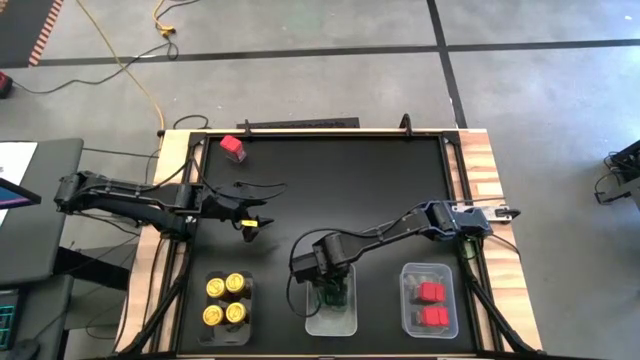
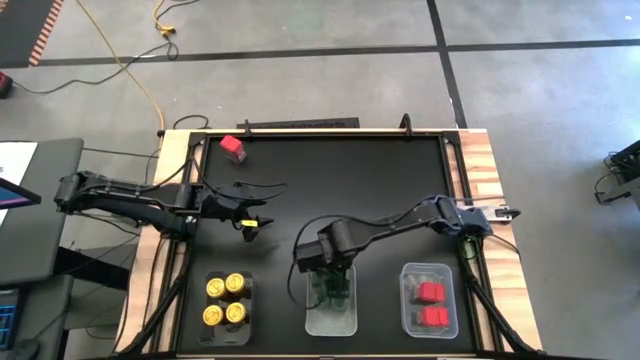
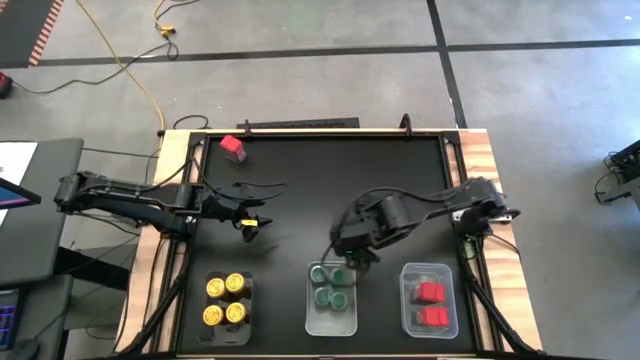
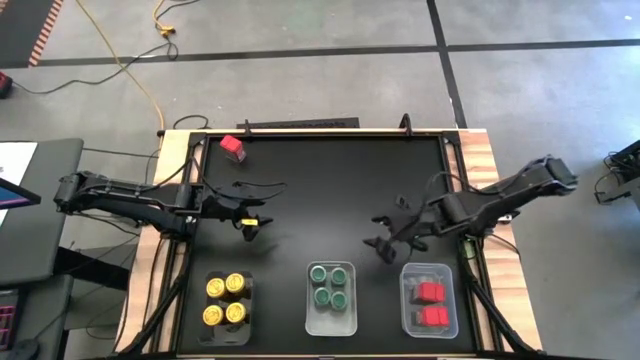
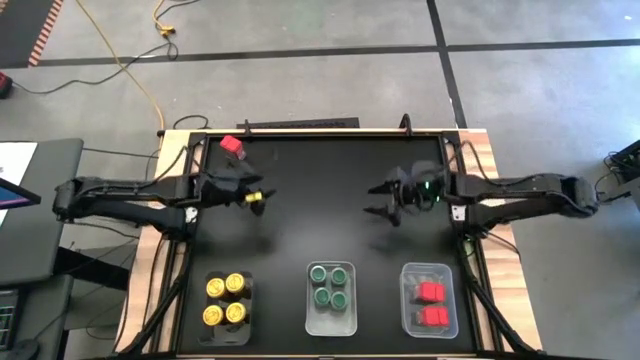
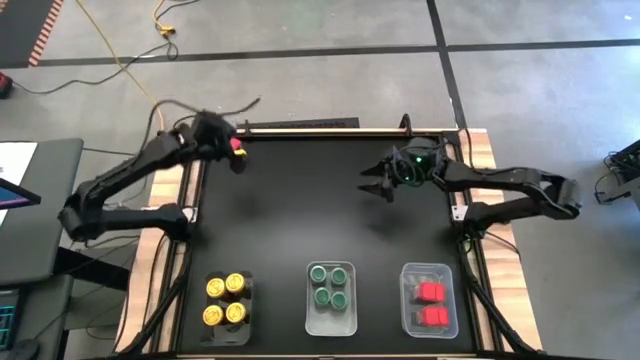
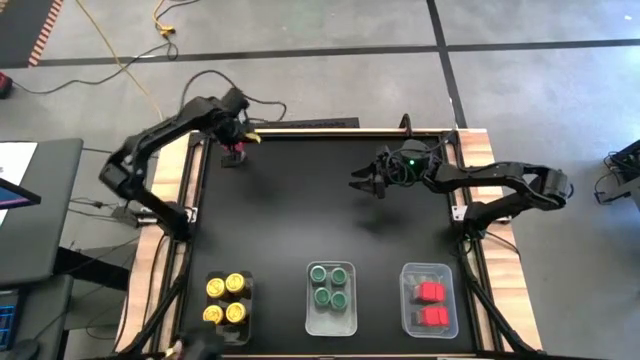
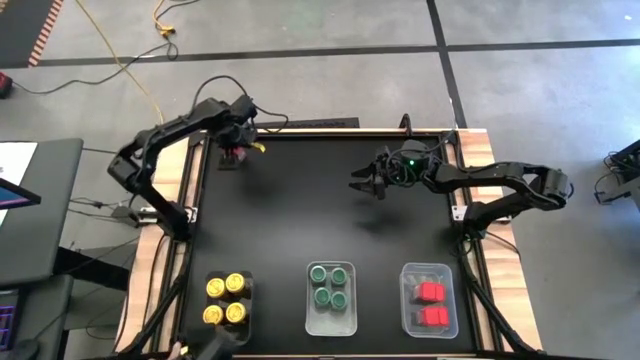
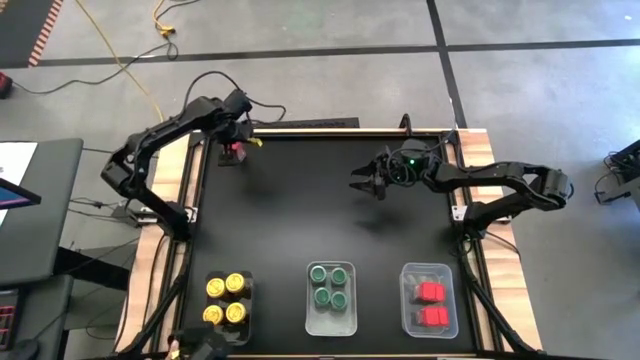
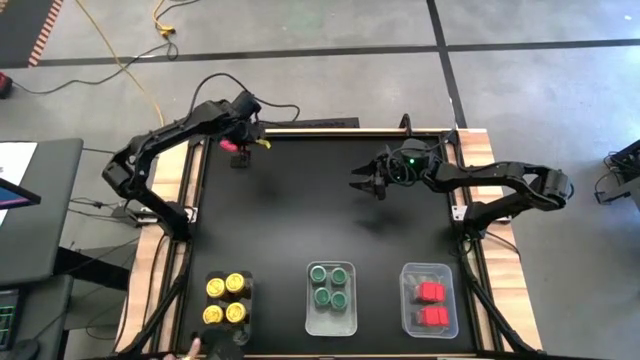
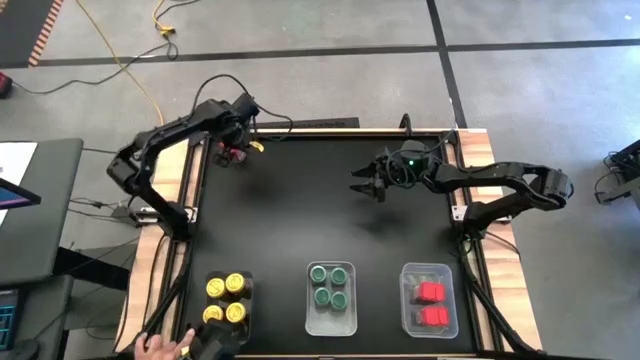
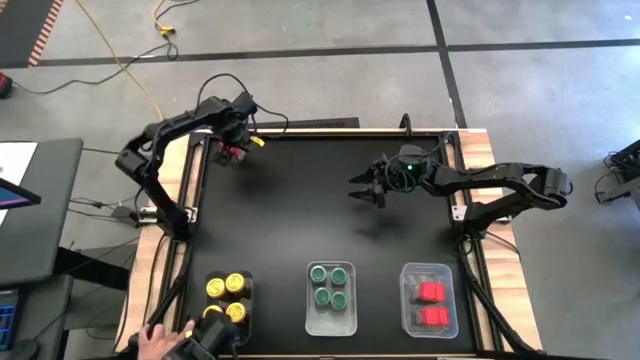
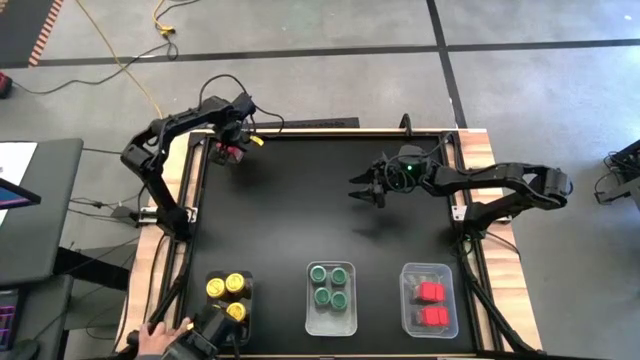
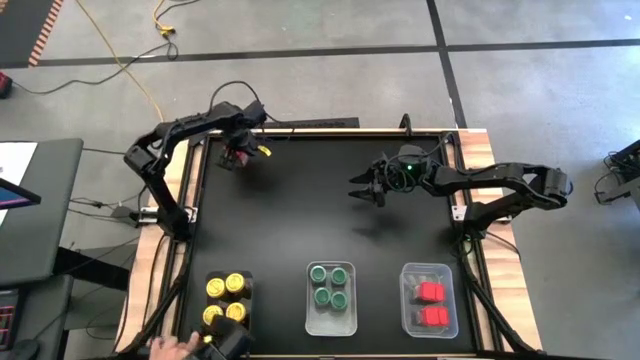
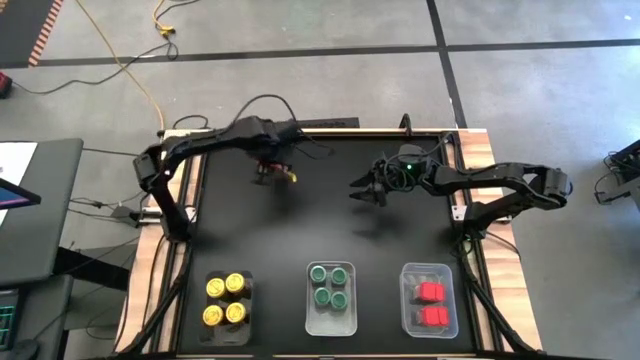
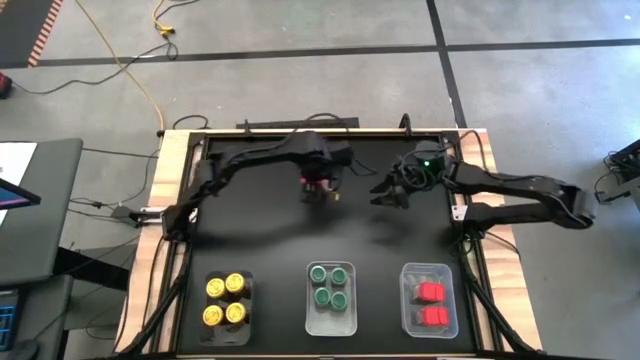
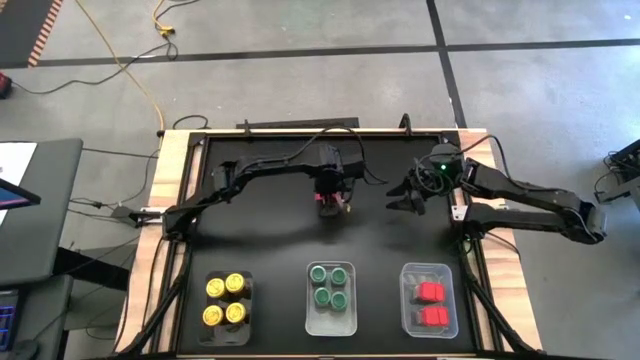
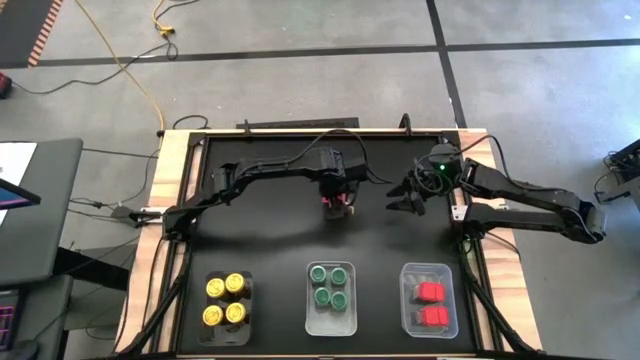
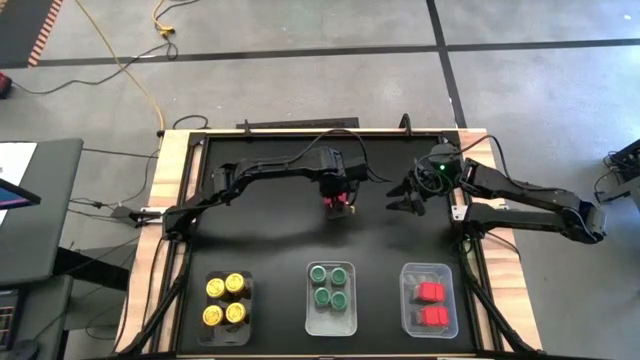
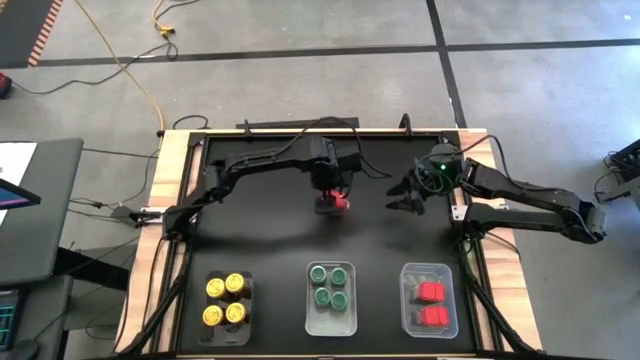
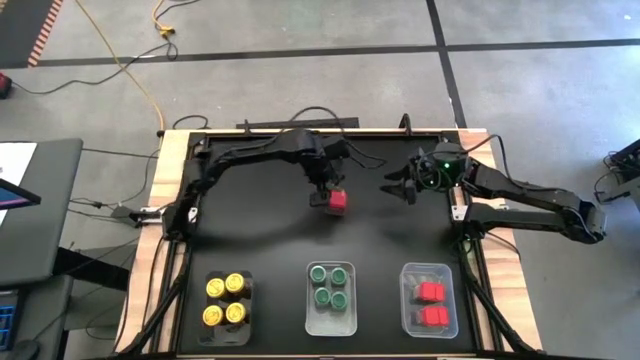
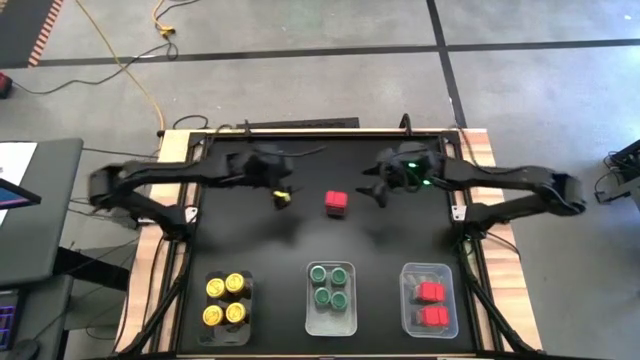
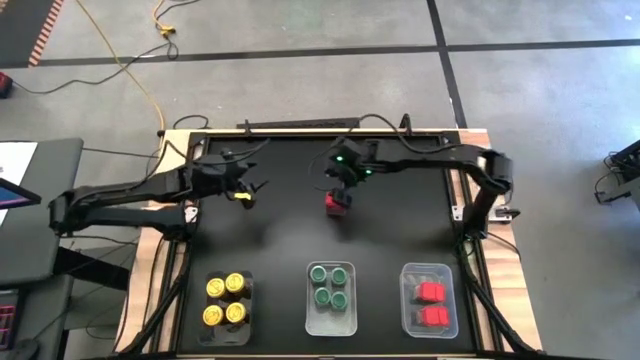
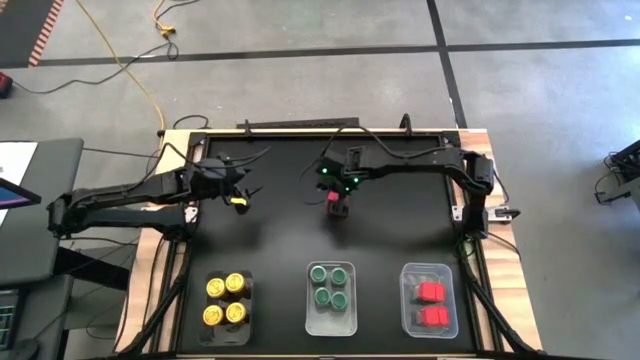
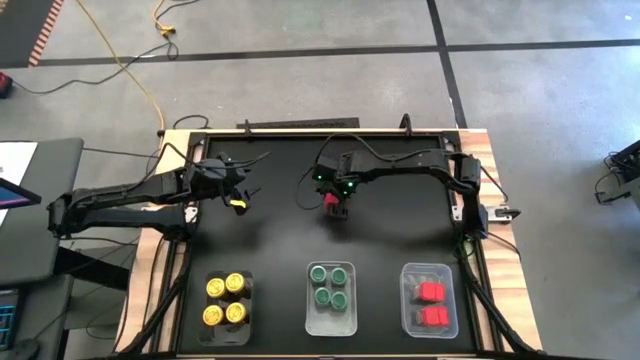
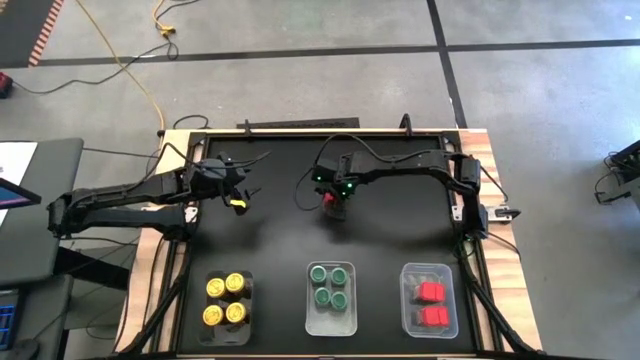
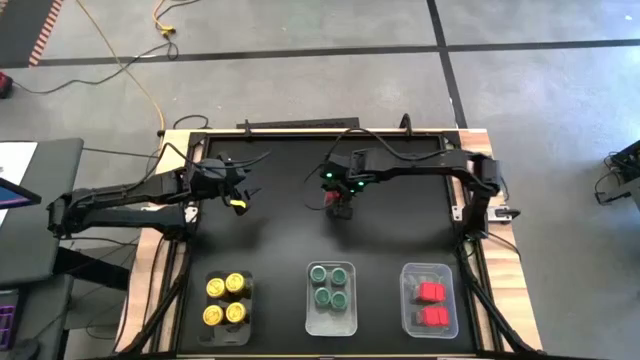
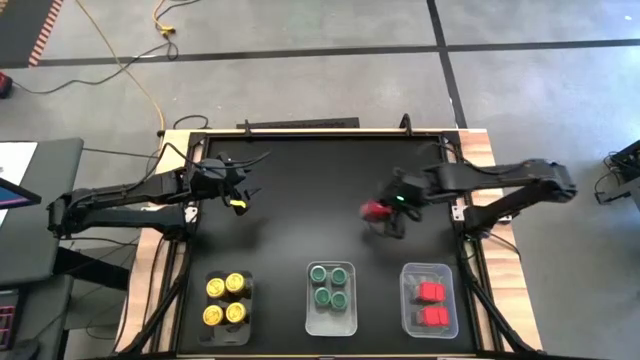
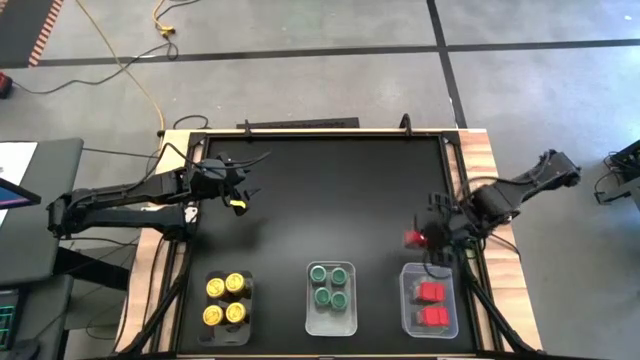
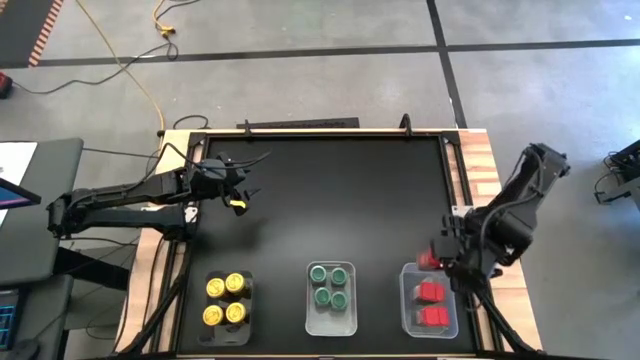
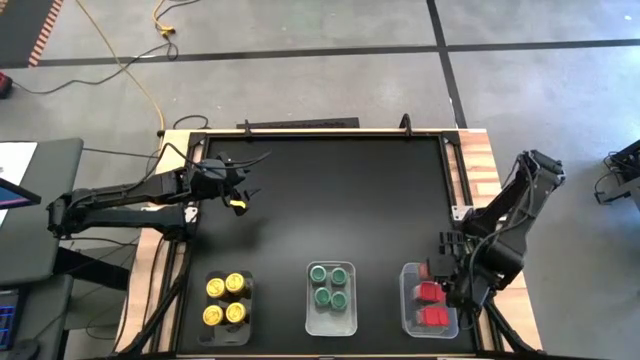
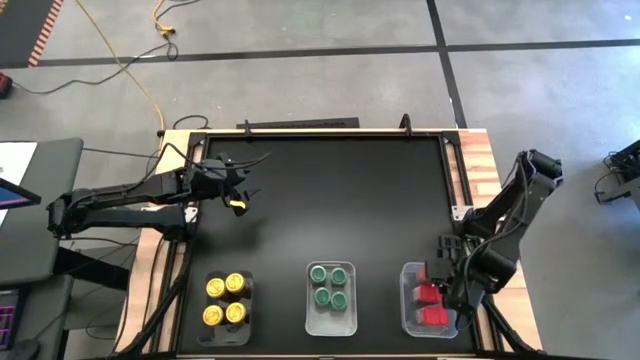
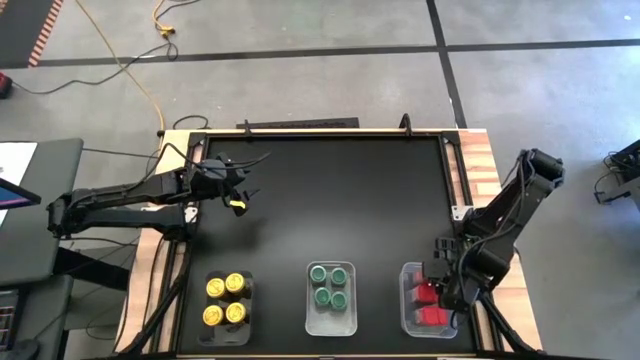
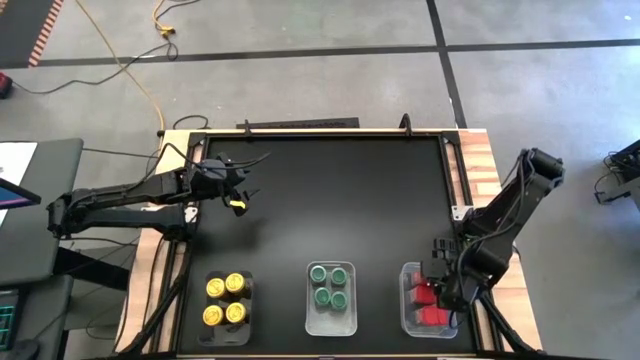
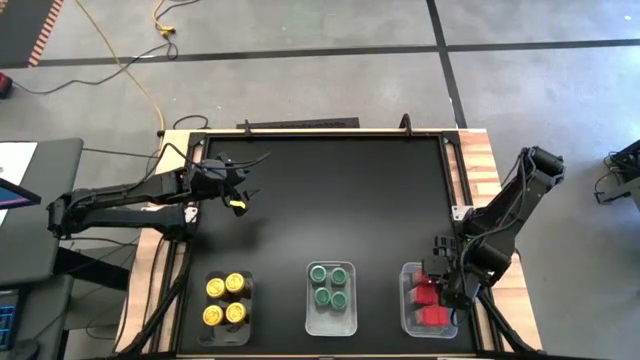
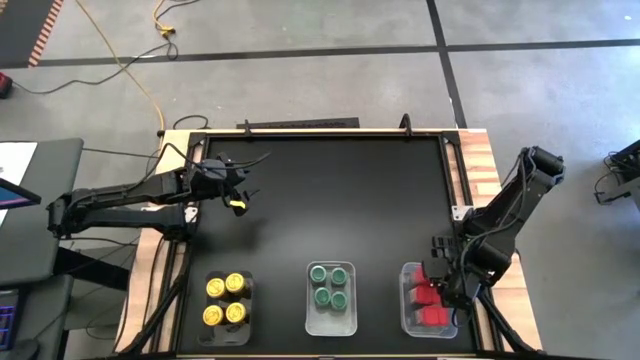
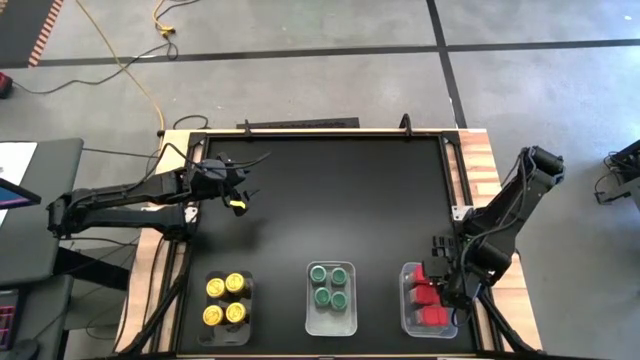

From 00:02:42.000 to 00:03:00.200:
Task: Sort spices by type
Put the red seasoning can into the transparent bin

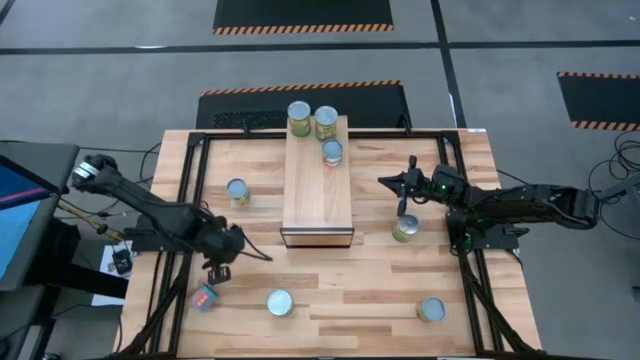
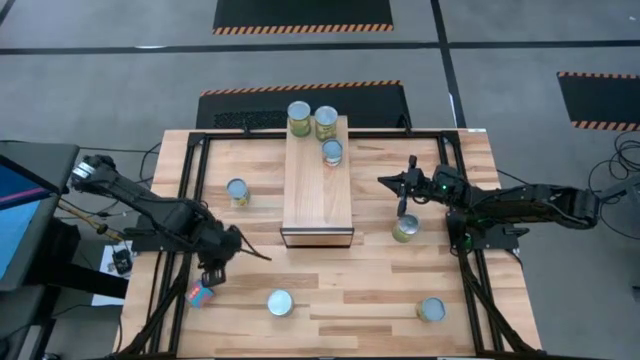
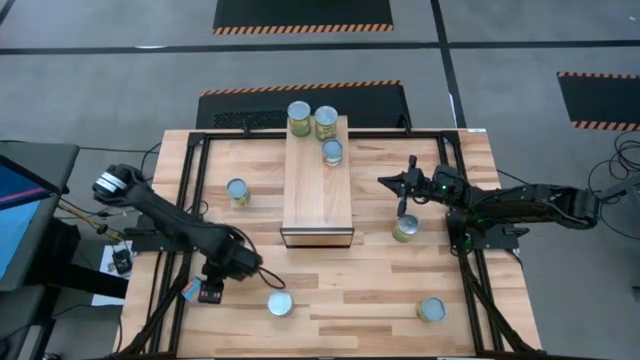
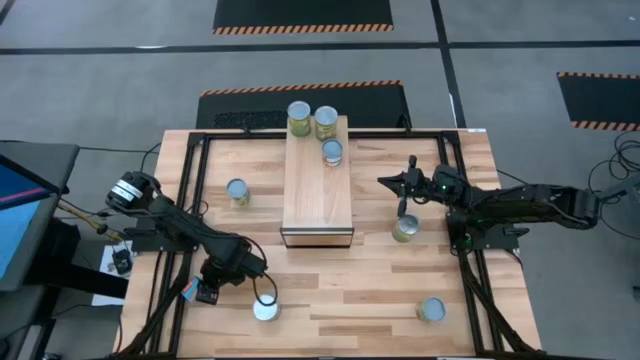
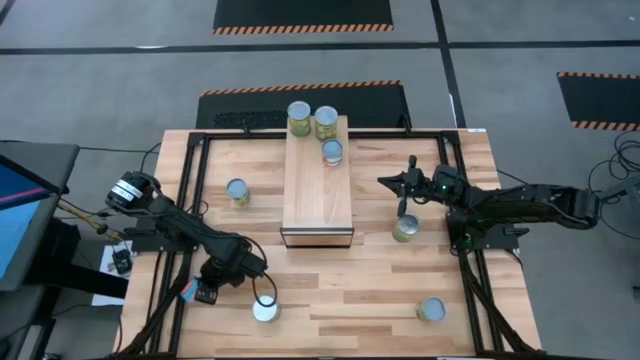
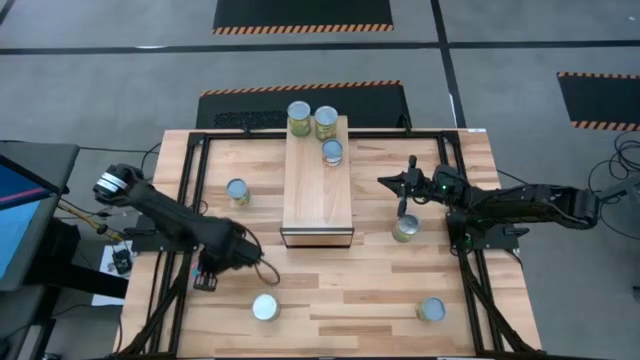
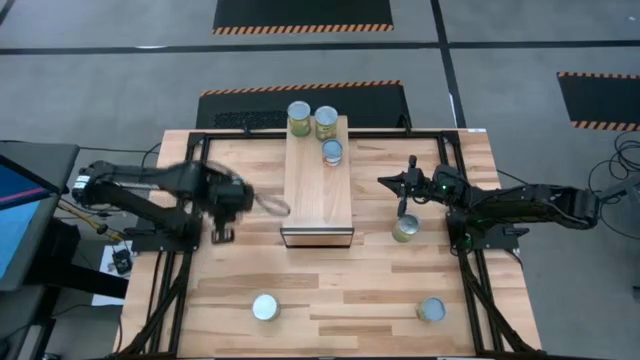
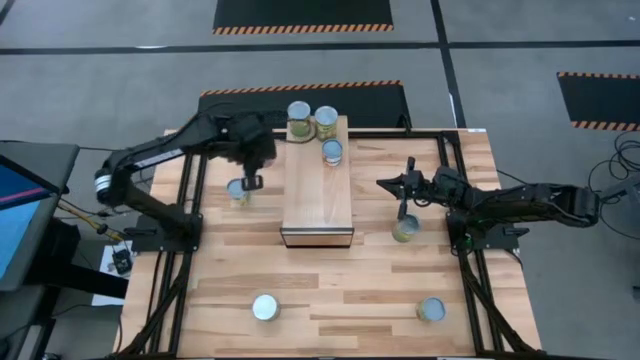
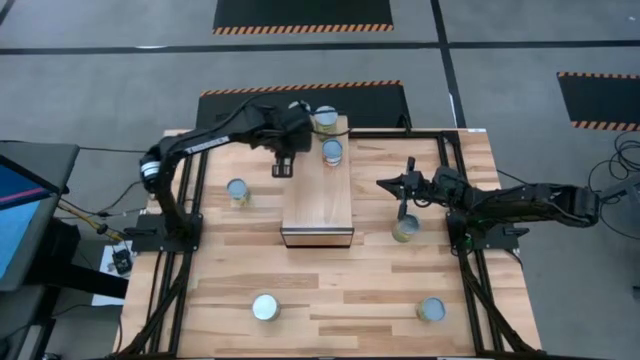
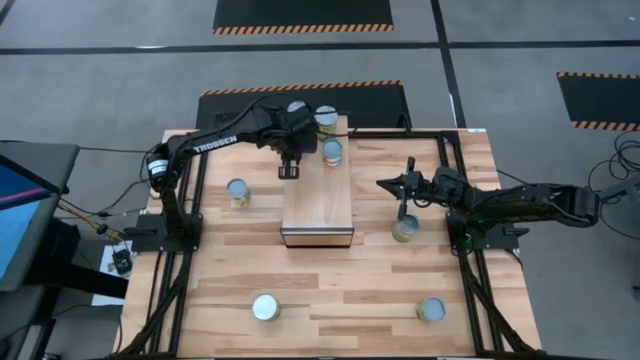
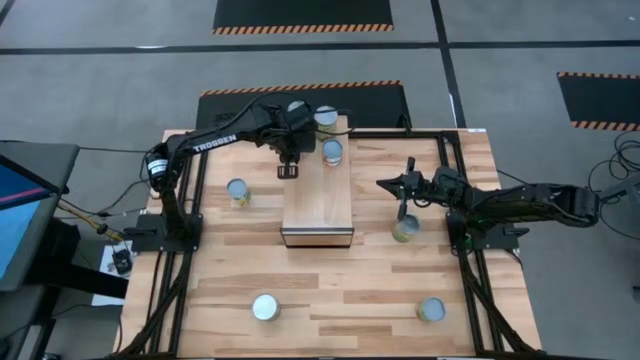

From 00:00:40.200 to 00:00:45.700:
Task: Pick and place cans onto a shelf
Put the canned corn on the shelf
